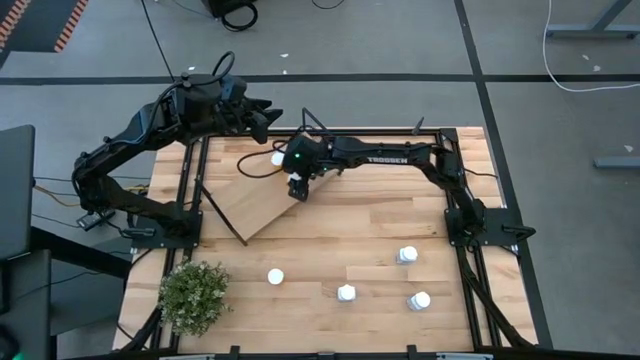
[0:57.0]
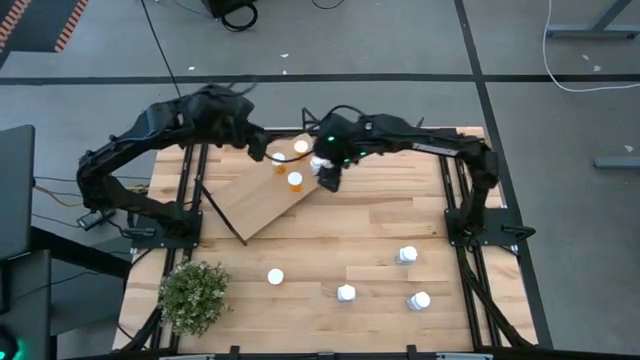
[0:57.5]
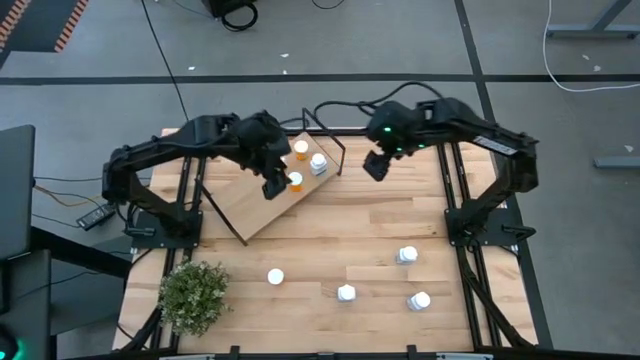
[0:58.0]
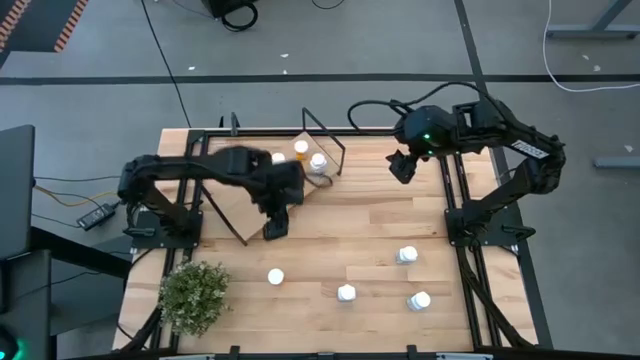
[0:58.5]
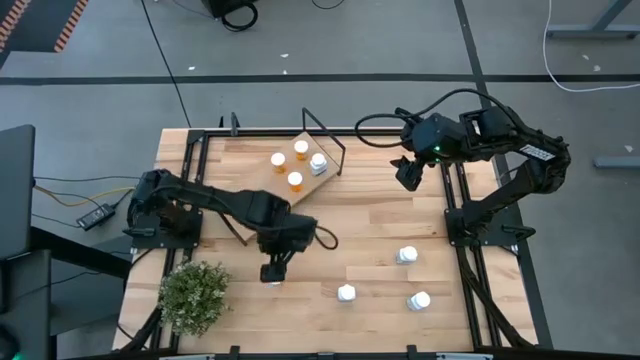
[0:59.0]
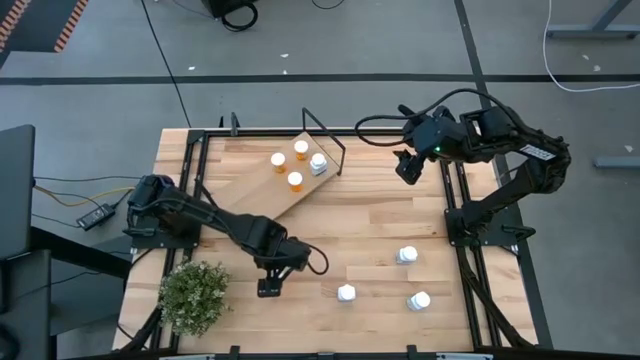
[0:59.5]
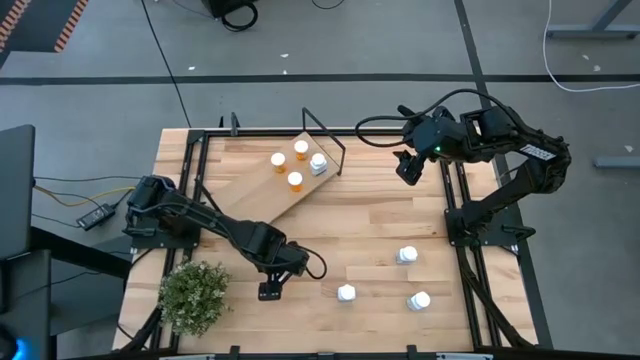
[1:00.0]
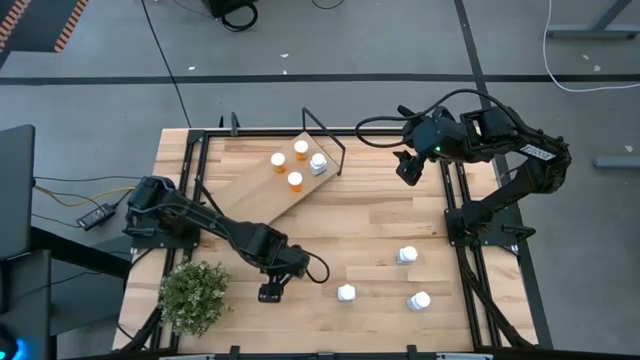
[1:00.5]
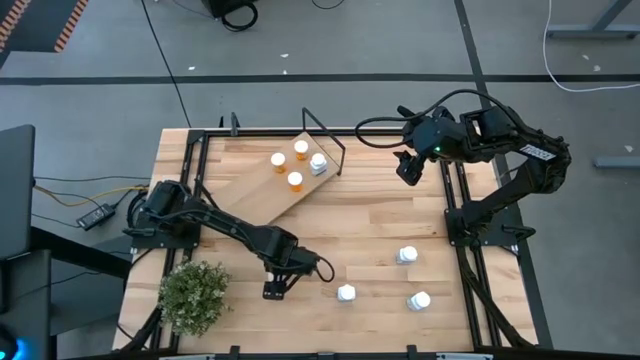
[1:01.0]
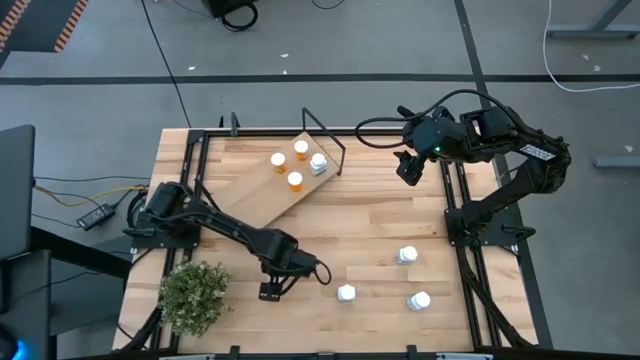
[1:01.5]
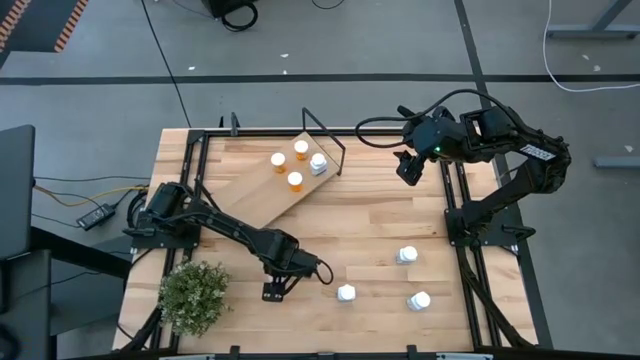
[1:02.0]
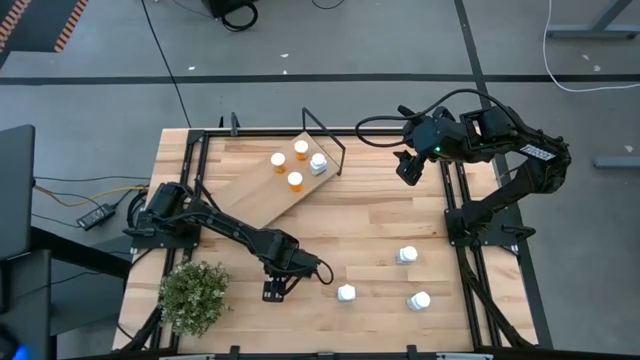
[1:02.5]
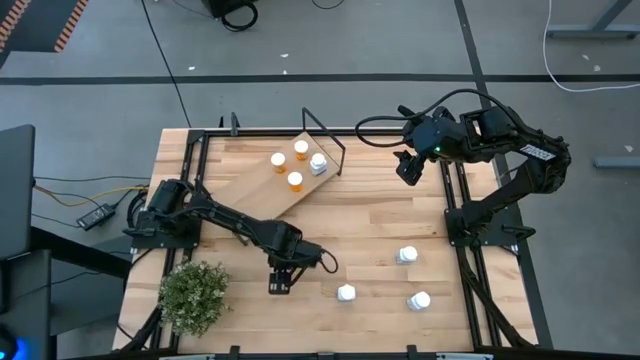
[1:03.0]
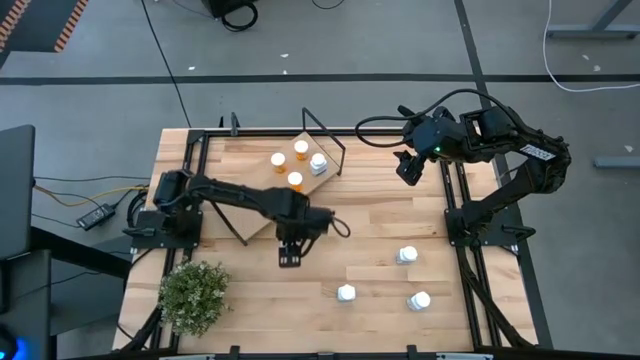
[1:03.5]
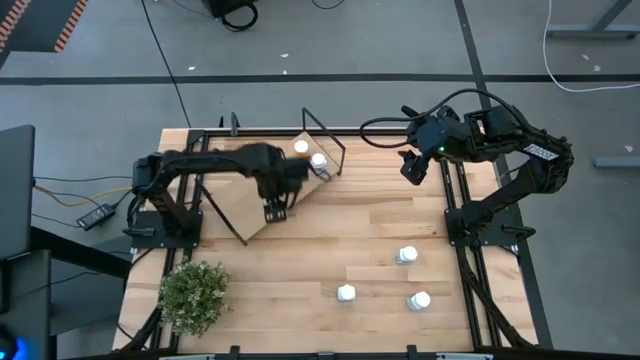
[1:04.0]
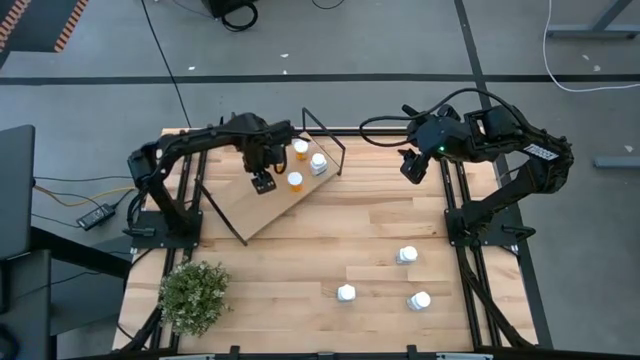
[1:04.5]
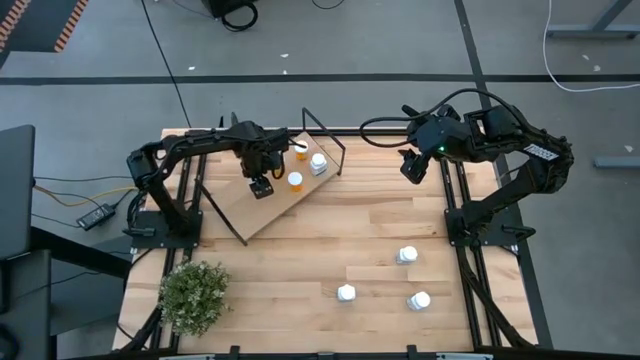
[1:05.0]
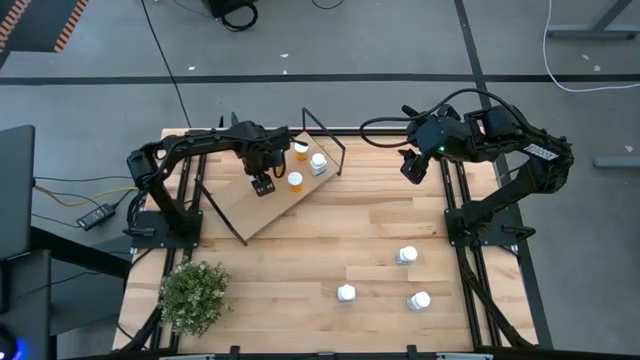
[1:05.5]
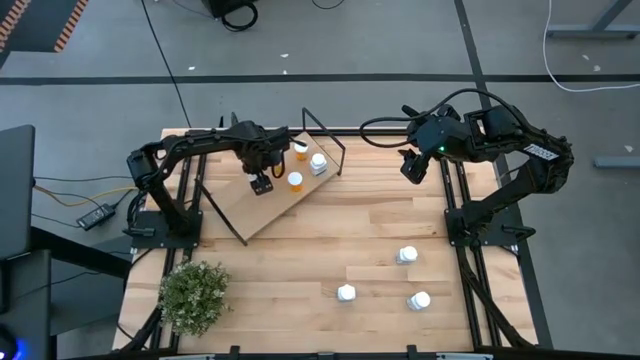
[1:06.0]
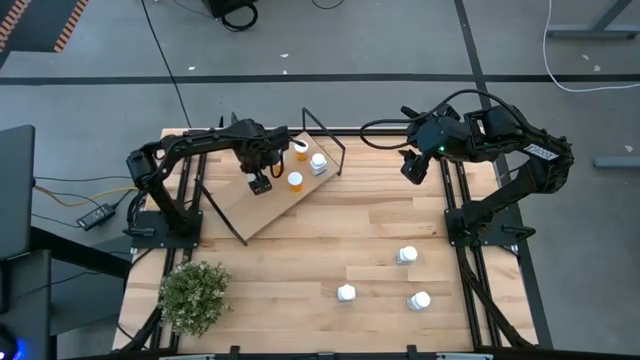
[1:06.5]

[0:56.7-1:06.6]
Task: Pick and place medicine bottles onto shelf by color
Put the orange pill bottle on the shelf

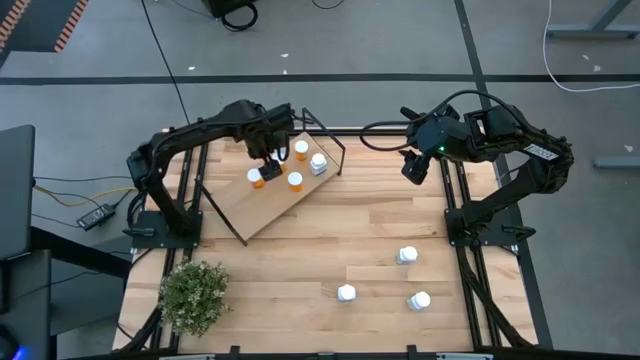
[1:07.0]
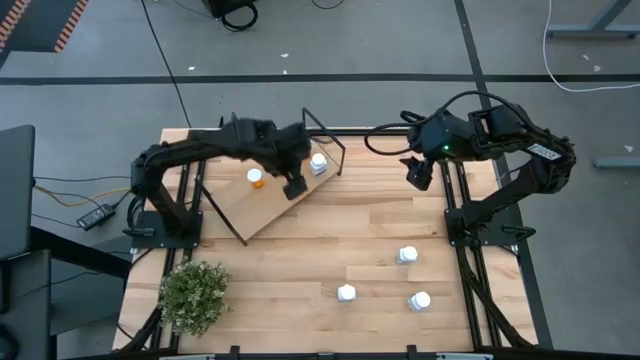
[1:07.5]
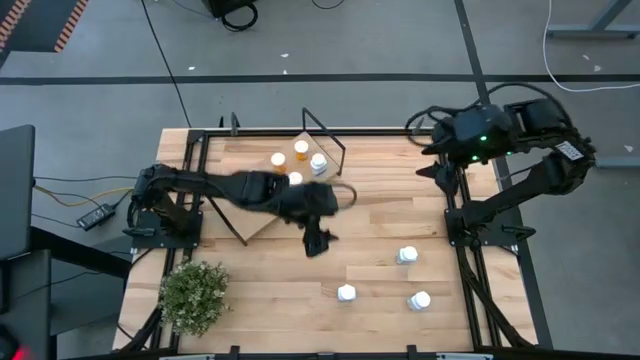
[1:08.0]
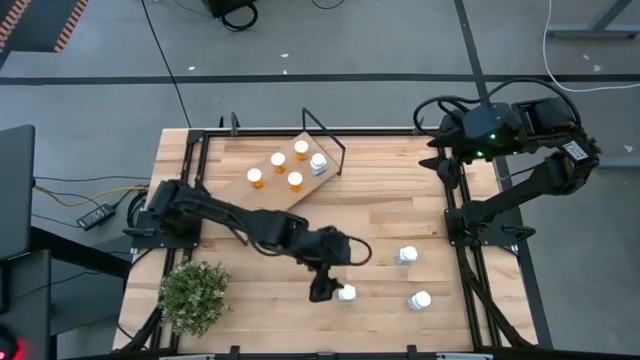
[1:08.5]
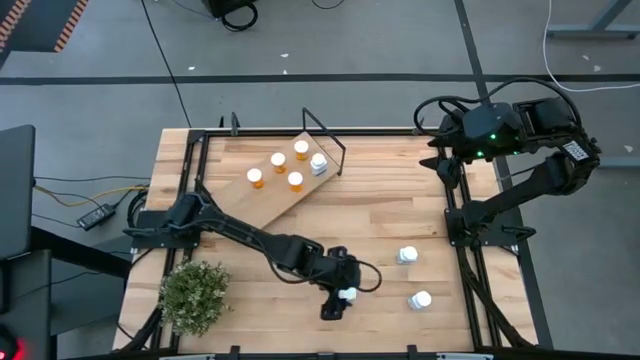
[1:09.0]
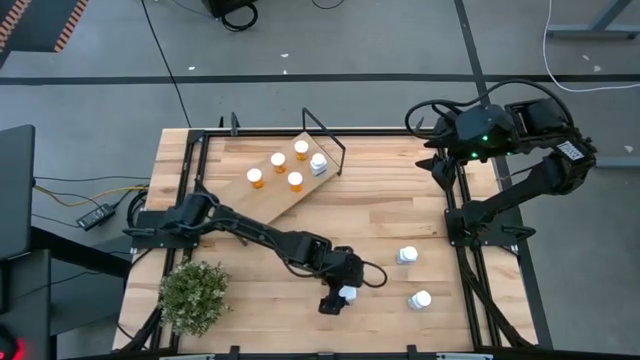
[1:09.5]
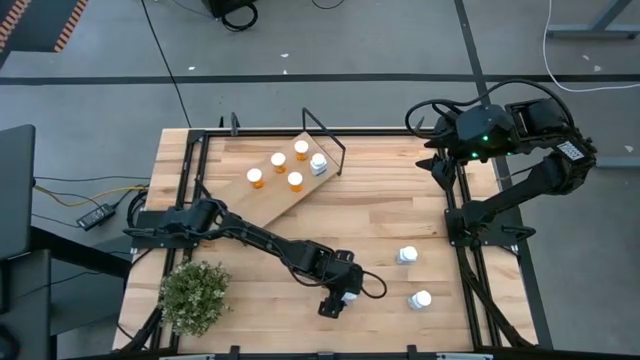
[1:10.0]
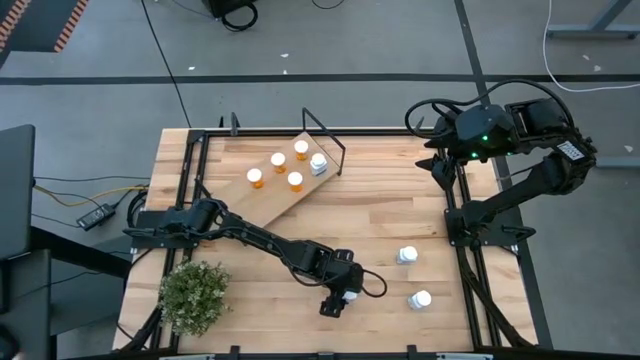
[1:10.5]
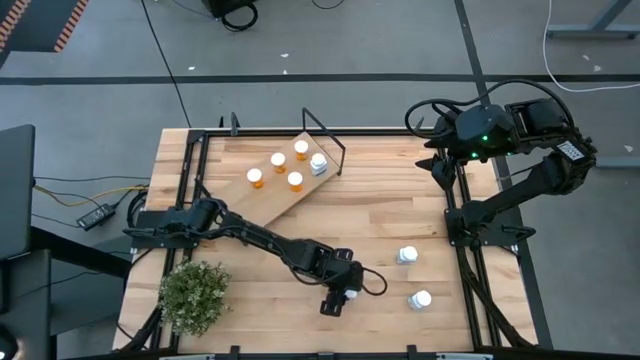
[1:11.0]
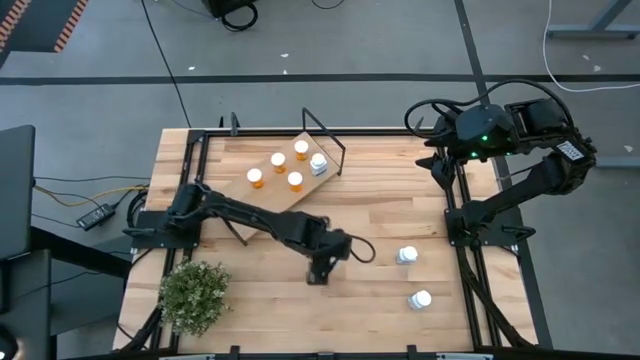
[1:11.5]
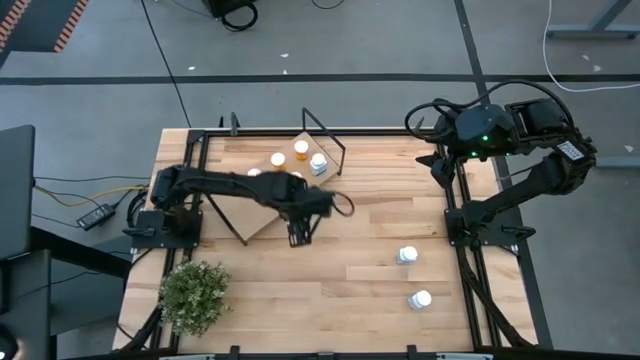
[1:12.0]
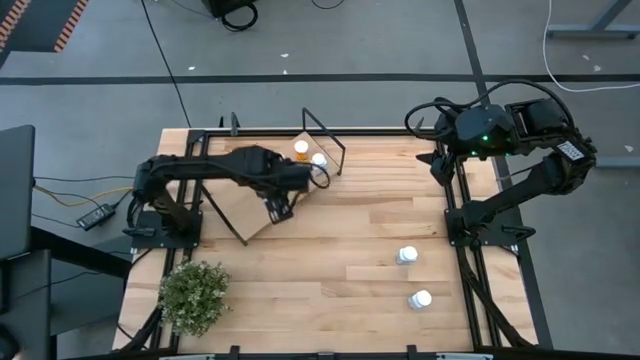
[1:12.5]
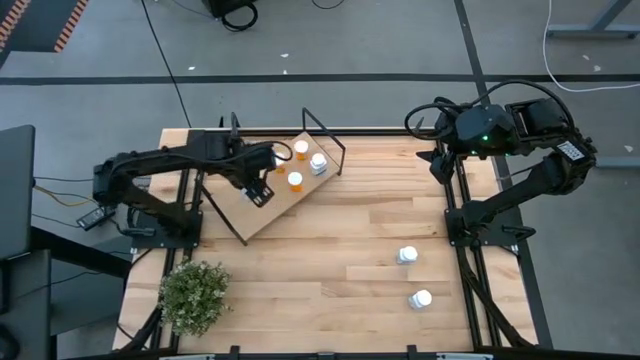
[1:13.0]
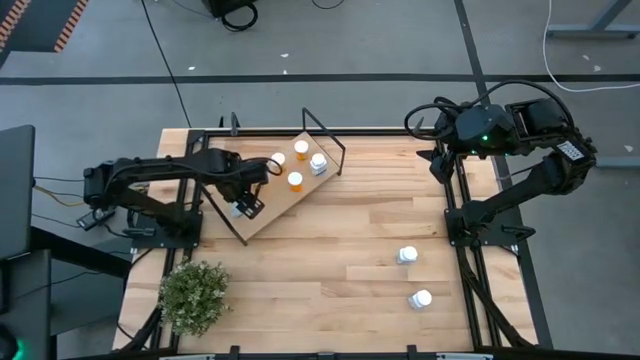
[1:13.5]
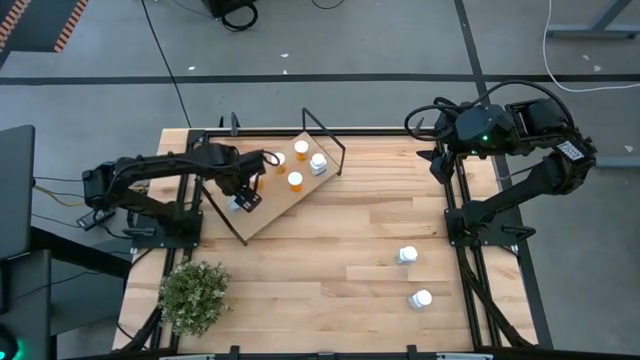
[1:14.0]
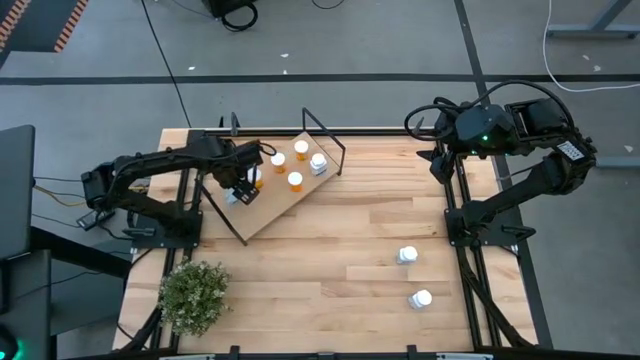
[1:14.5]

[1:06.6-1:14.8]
Put the white pill bottle on the shelf

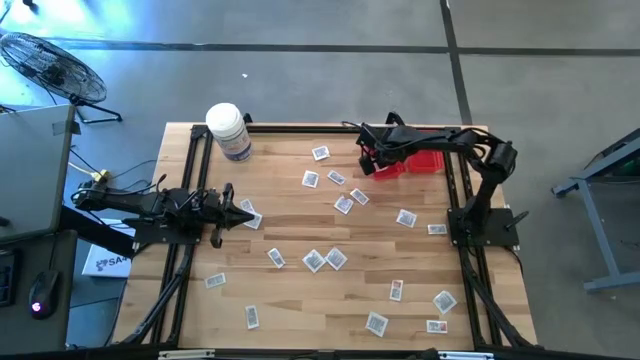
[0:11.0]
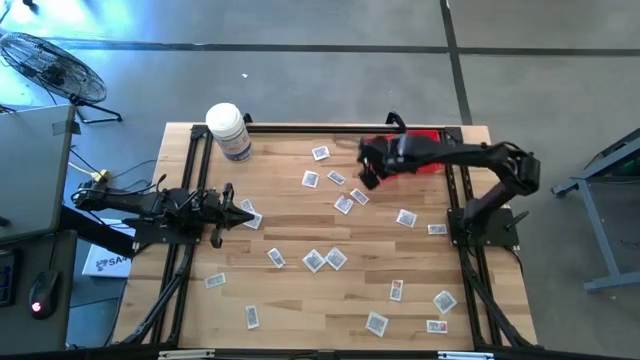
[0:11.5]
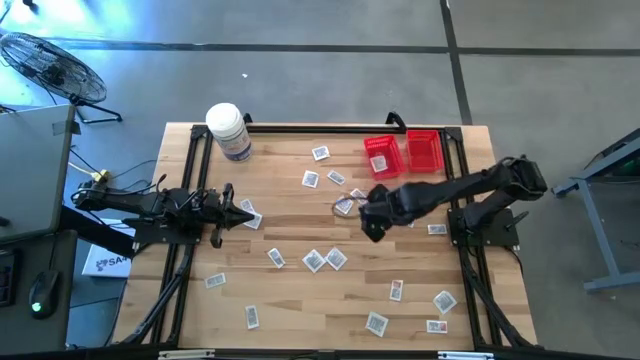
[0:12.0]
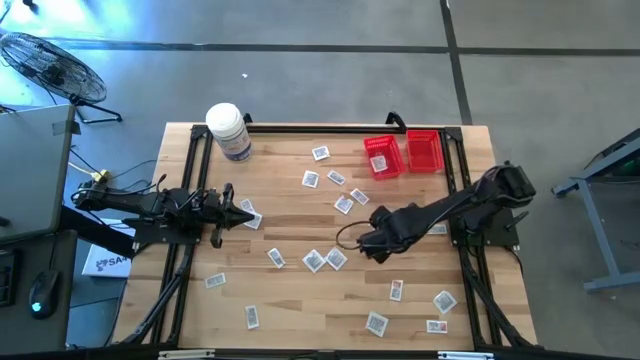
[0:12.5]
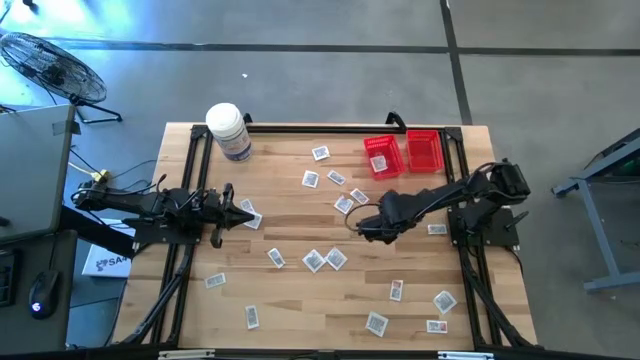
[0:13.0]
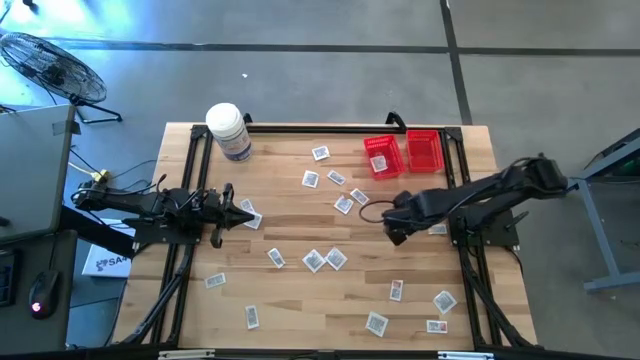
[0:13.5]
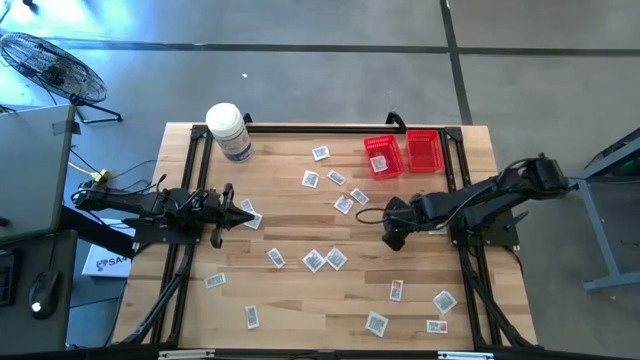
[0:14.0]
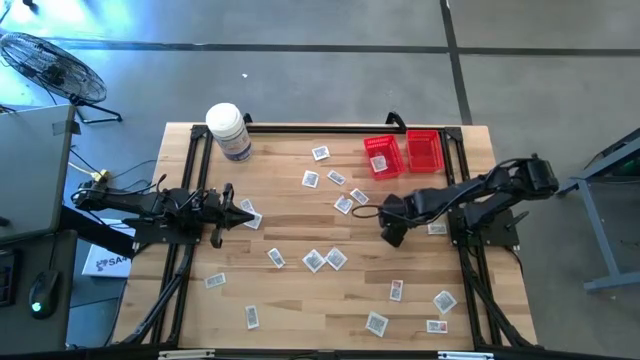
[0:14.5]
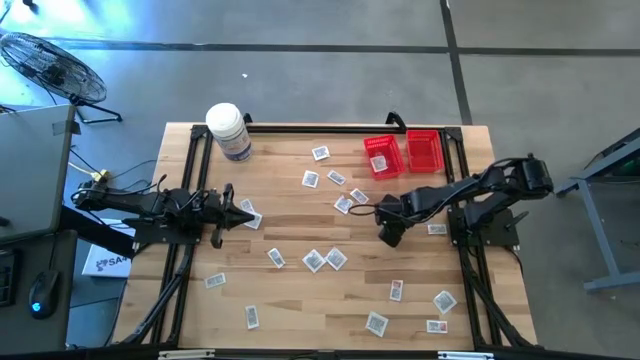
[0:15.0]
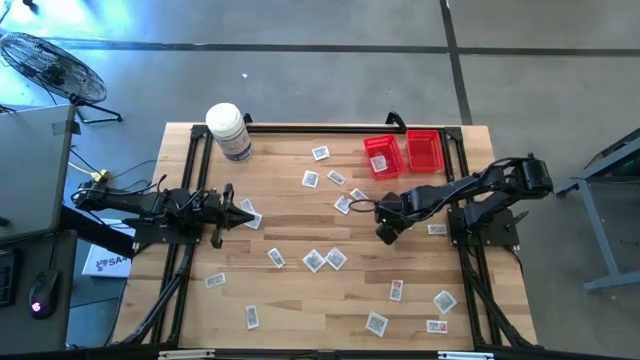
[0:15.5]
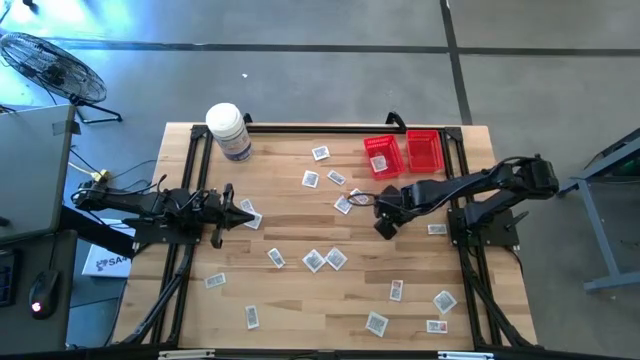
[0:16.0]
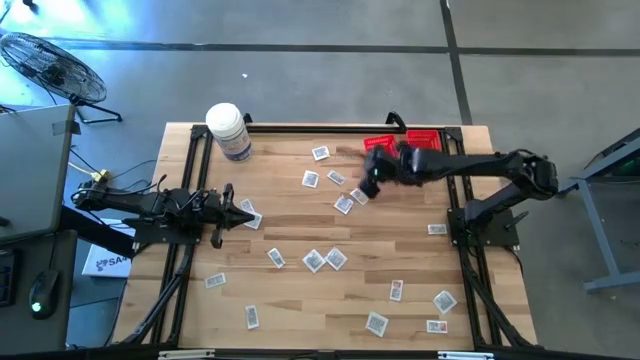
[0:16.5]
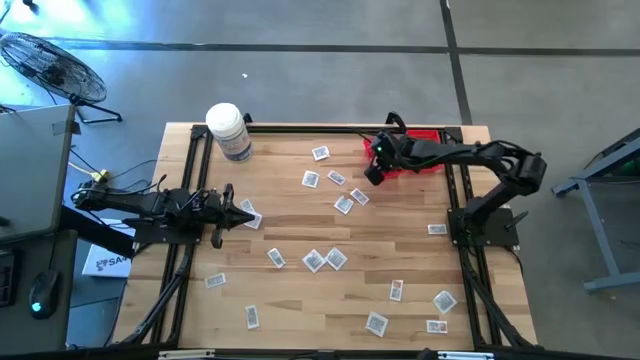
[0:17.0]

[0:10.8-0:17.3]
Task: Pick & Place First Aid Supplies
Put the towelette pack into the left red bin
